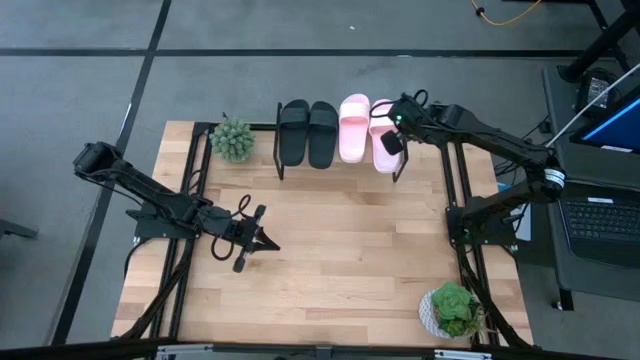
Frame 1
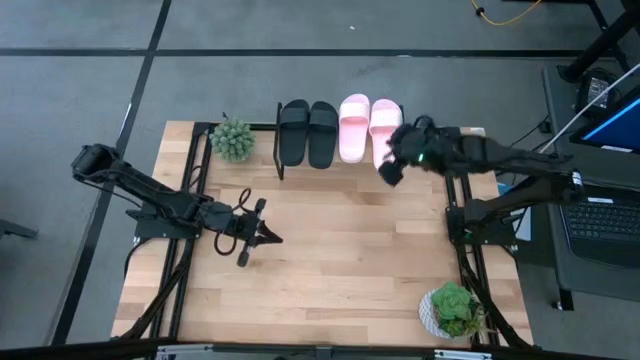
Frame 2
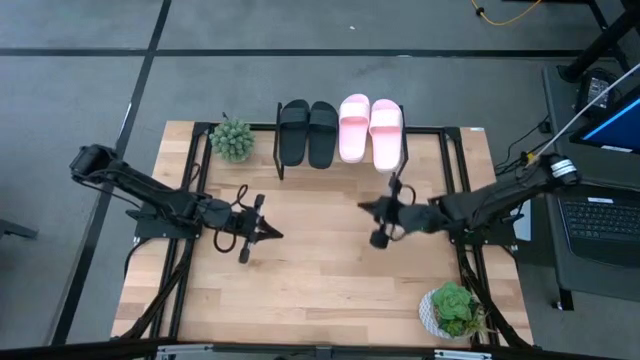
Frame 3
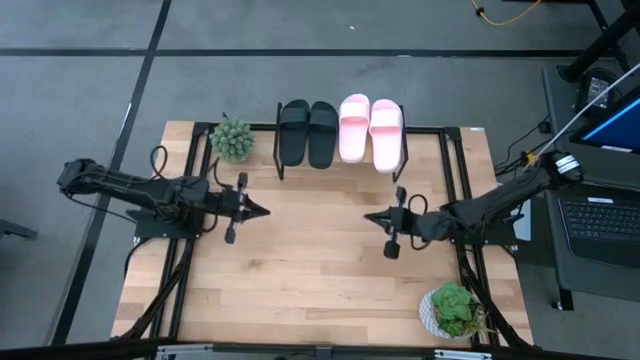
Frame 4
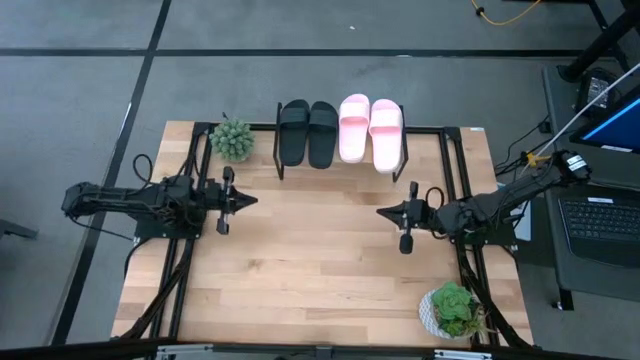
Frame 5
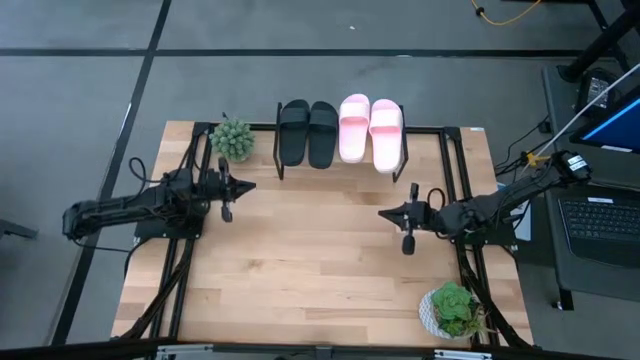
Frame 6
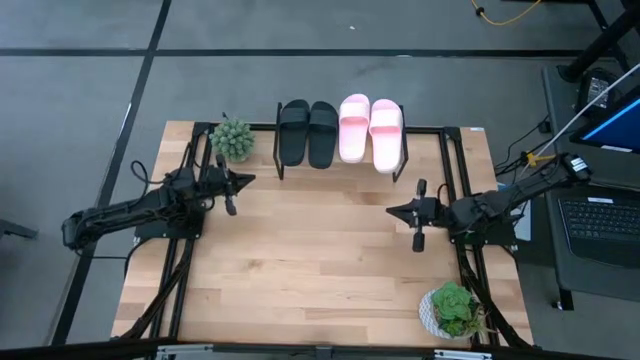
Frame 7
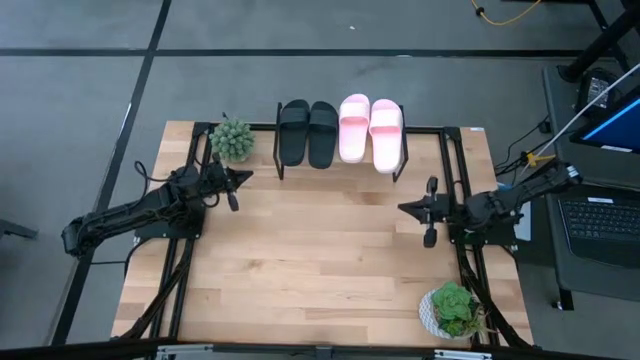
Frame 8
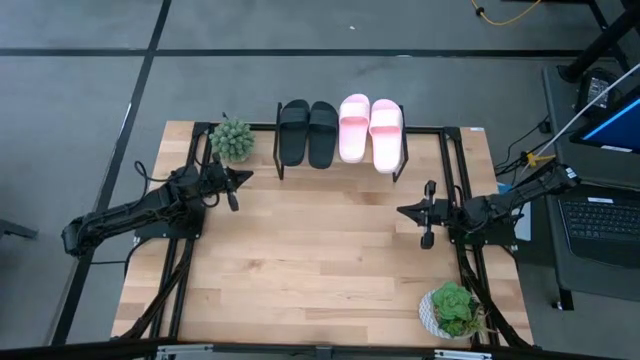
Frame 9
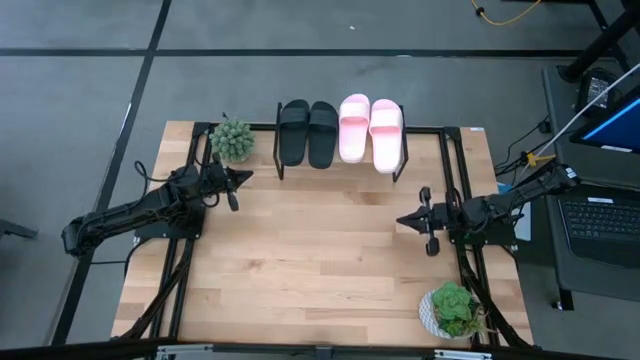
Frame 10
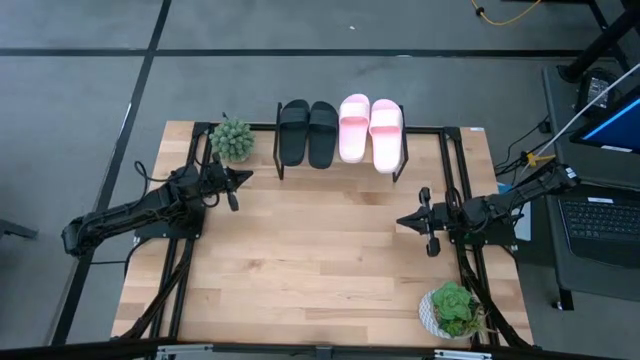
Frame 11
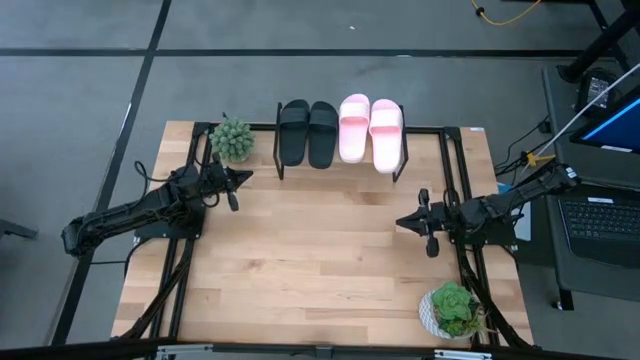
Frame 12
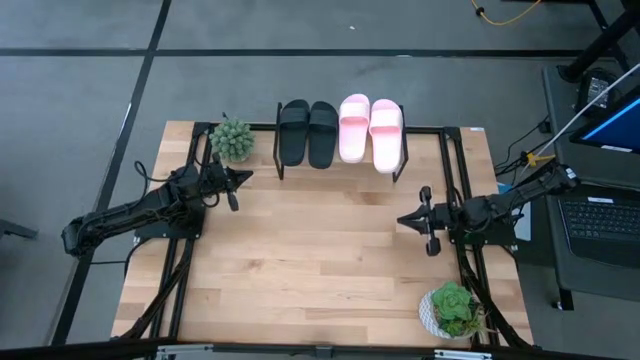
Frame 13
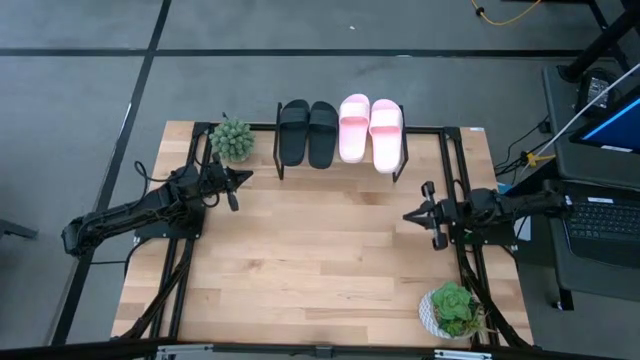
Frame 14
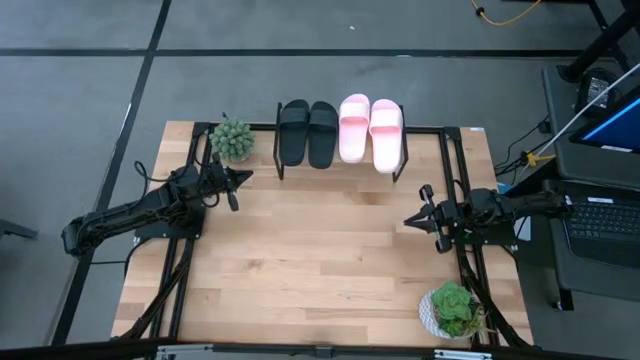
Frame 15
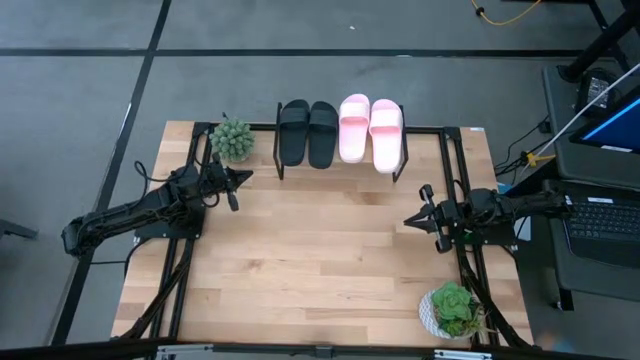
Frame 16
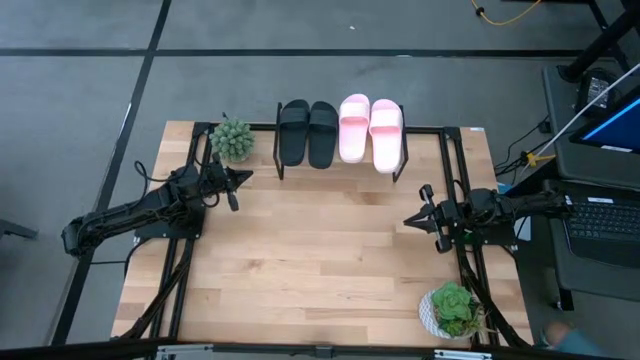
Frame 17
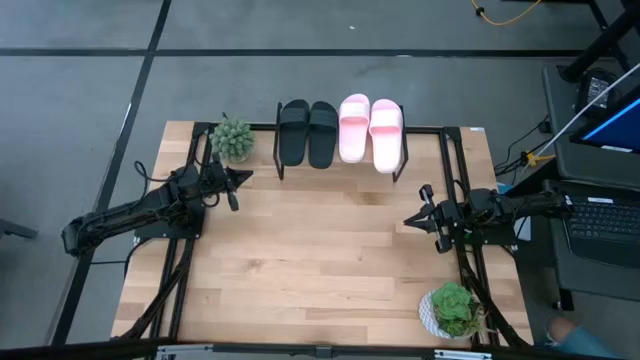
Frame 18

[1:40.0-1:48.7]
Task: Pick and place slides into the shelf
Return to Home Position

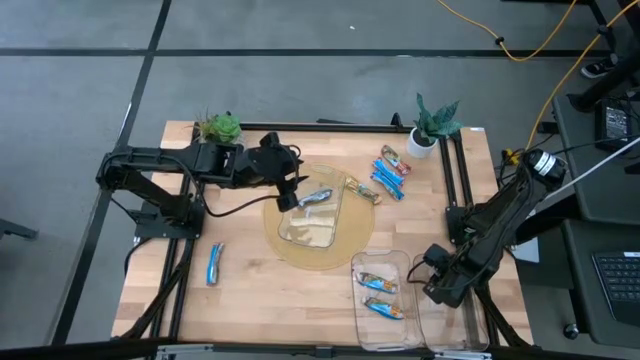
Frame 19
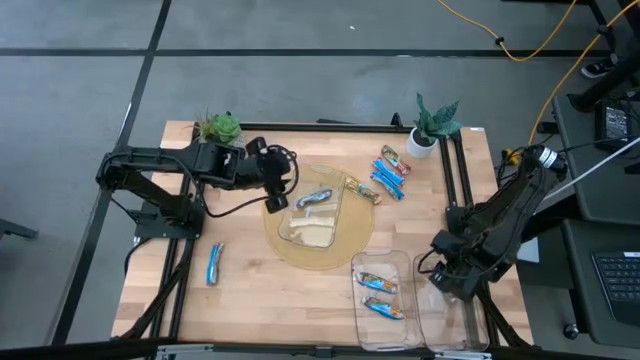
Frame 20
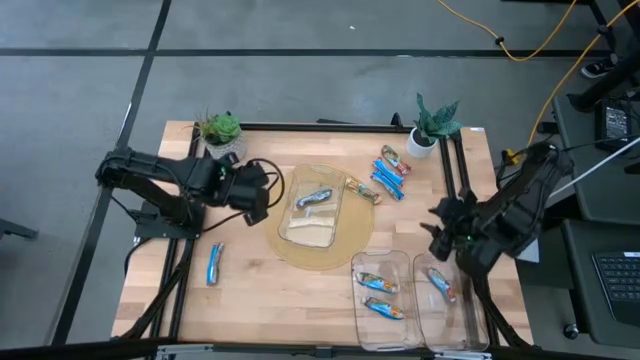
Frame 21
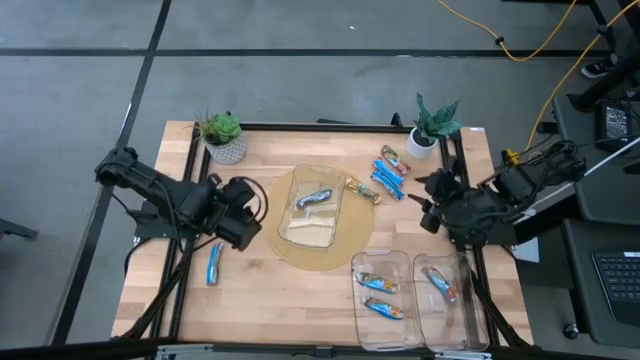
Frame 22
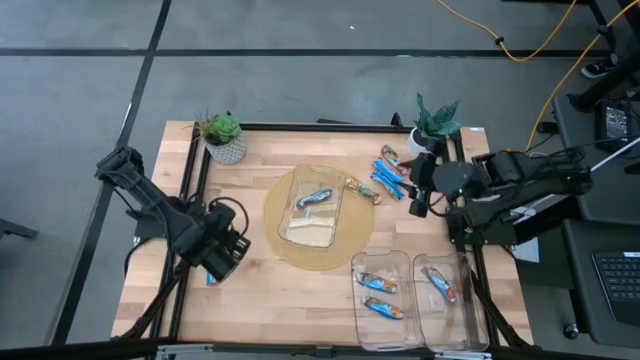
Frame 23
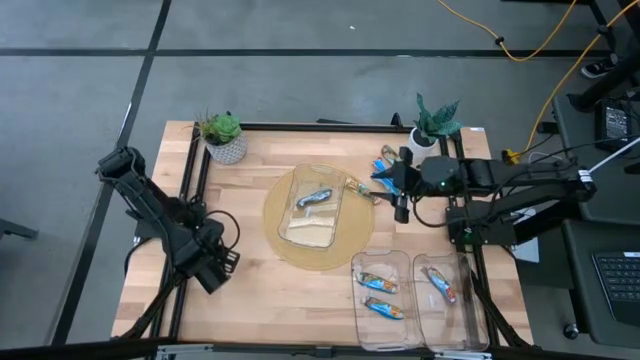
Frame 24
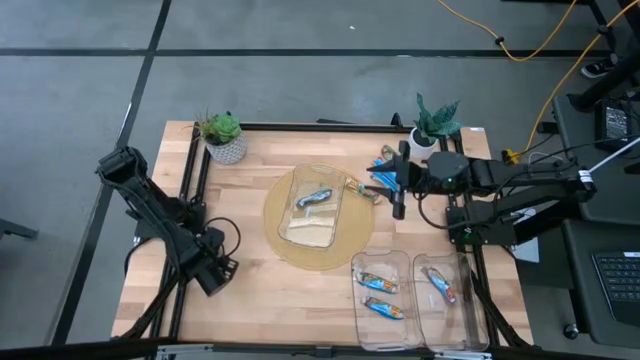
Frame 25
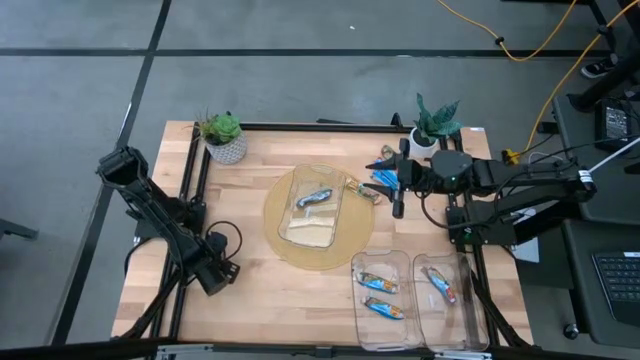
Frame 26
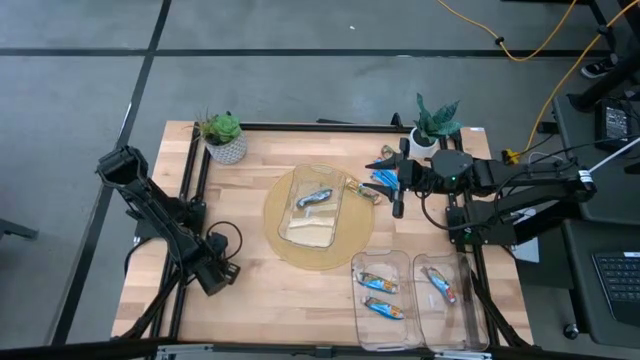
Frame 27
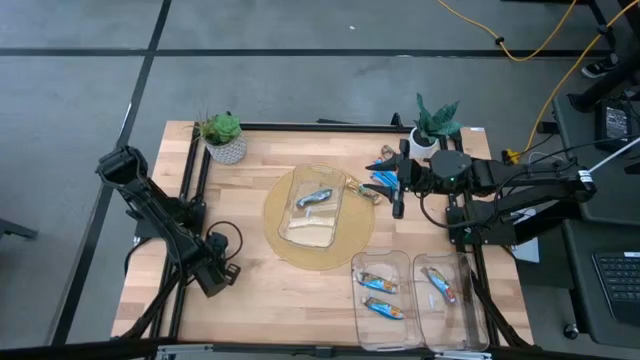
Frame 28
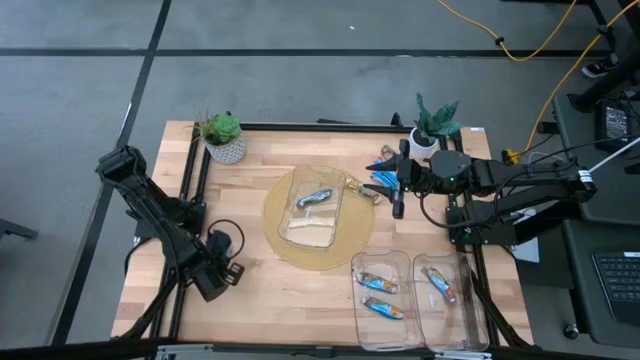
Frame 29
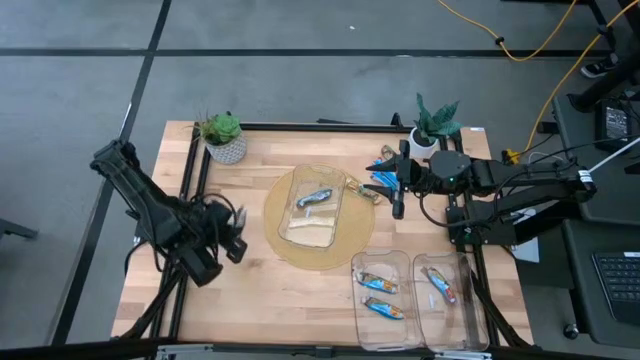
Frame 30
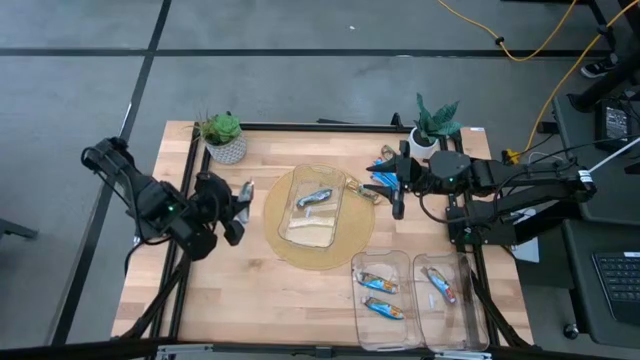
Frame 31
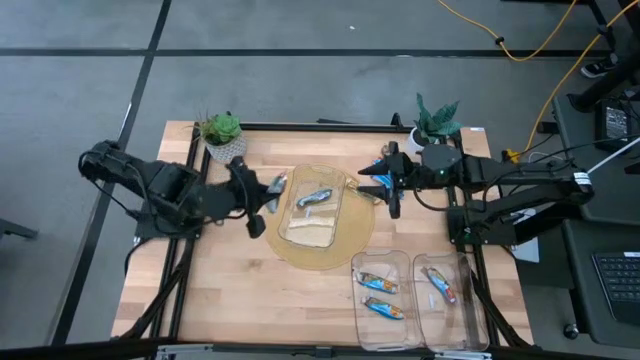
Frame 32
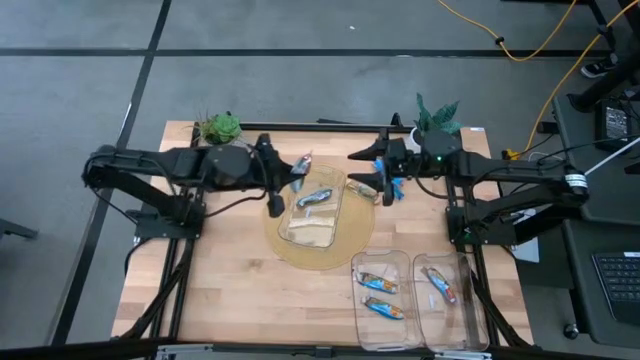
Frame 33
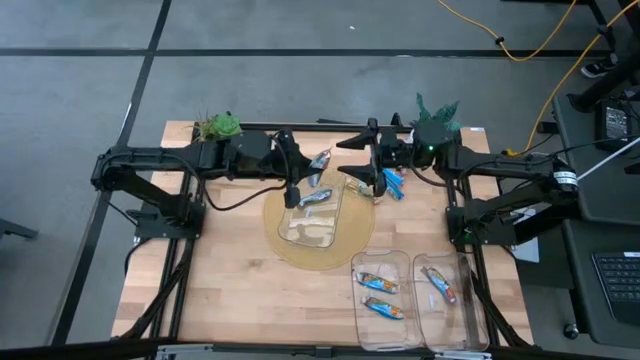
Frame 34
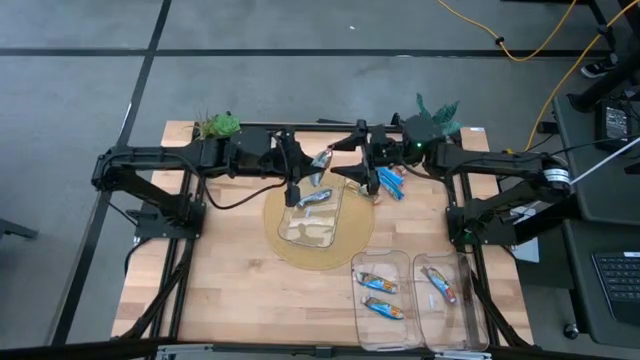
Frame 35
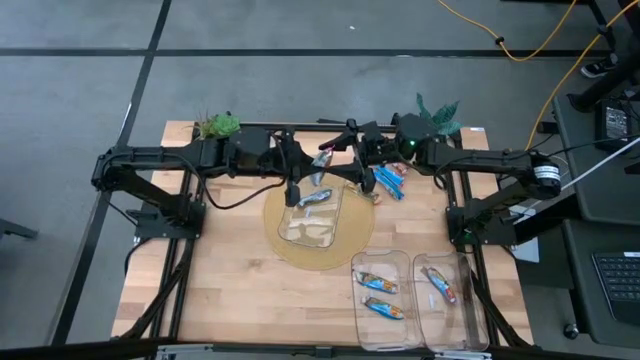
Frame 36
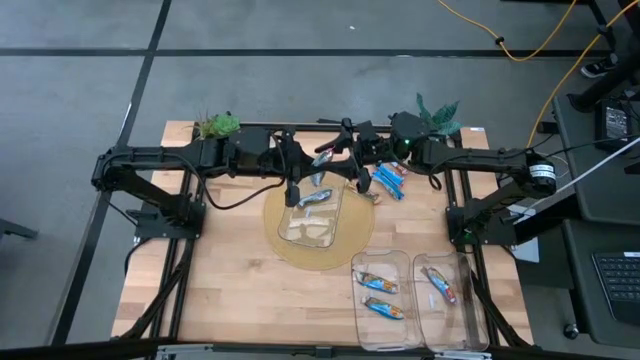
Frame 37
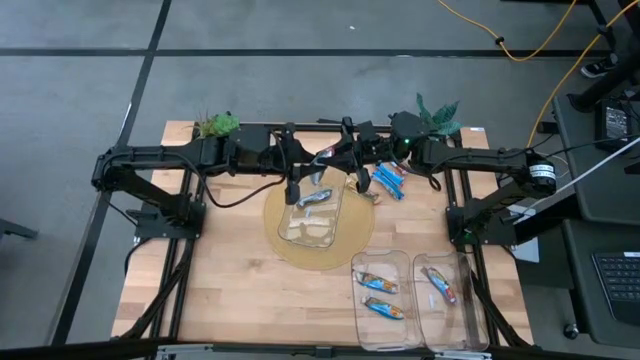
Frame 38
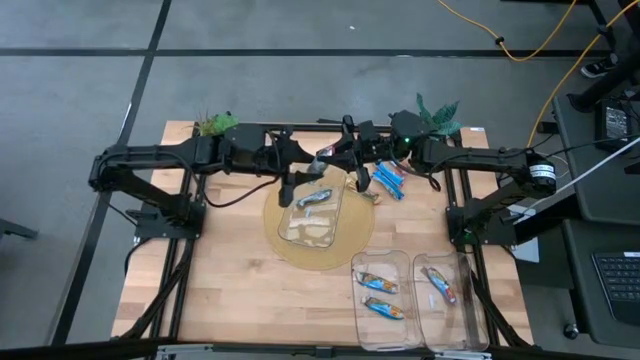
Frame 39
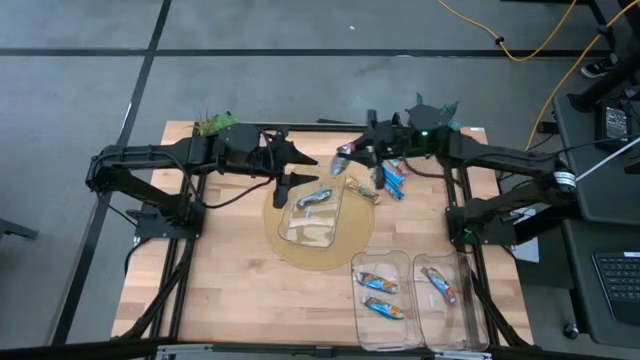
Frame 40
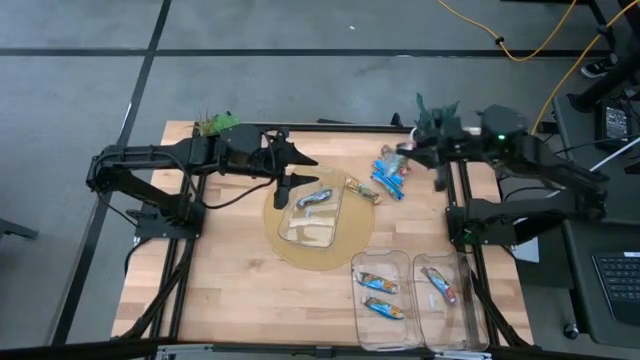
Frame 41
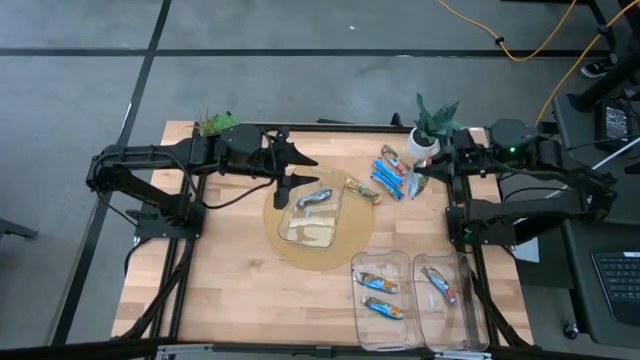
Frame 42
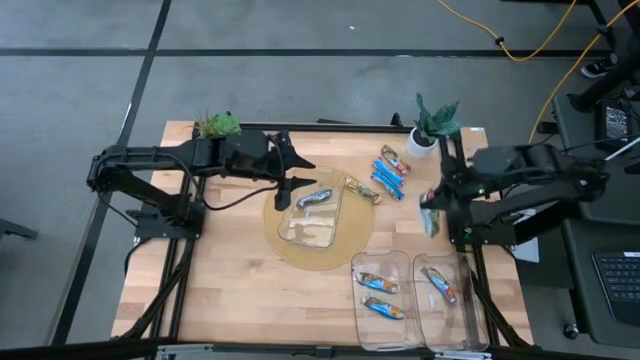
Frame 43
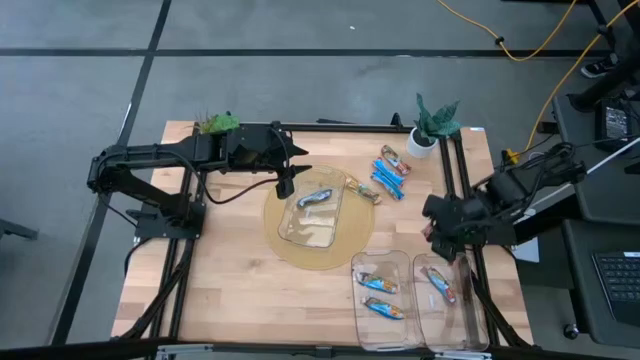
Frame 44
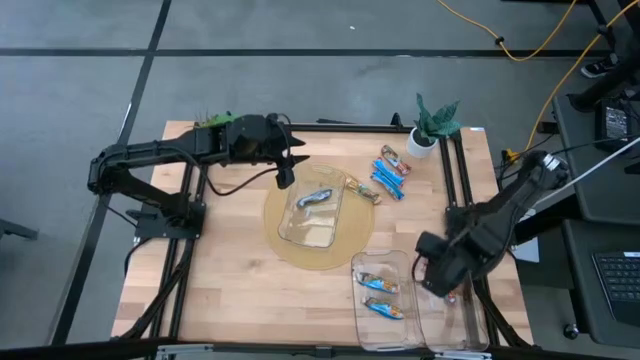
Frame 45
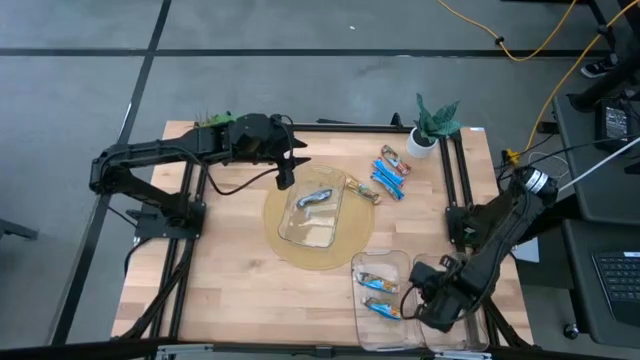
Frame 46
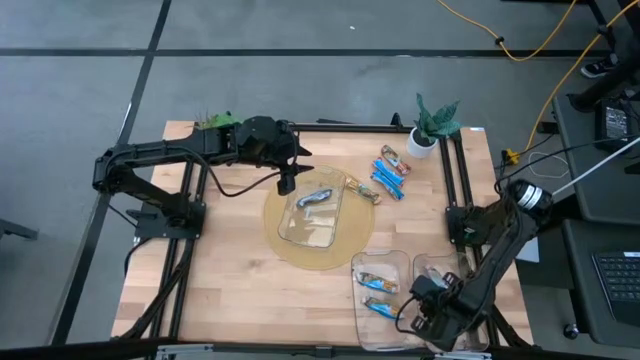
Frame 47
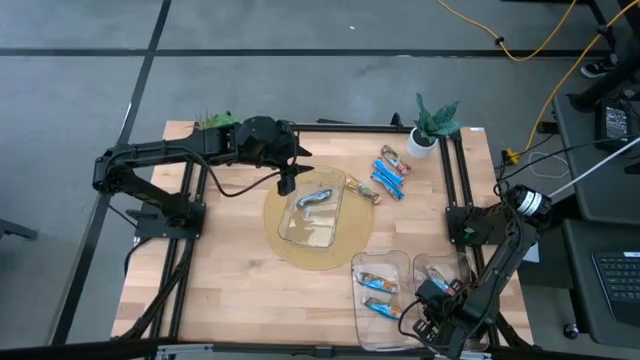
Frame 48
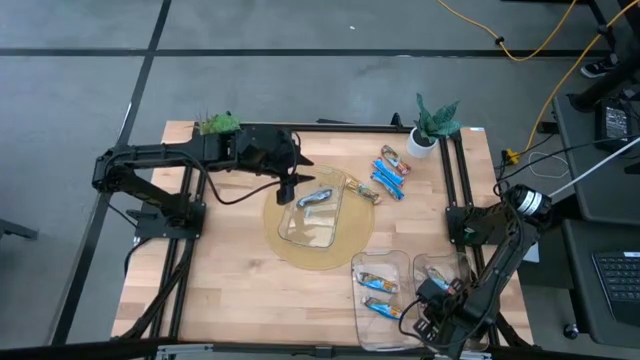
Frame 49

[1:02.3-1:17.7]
Task: Pick and place Granola Bars by type
Put the red granola bar pack into the bottom right transparent bin
